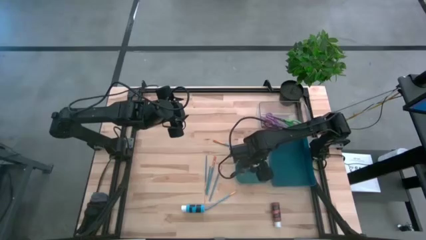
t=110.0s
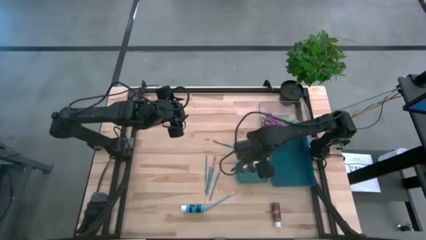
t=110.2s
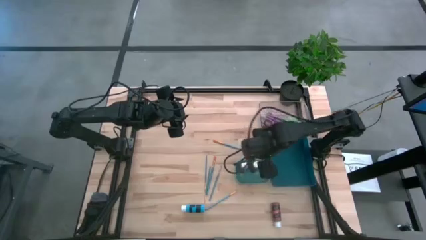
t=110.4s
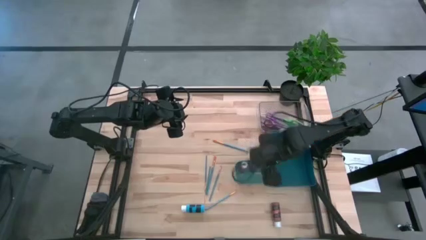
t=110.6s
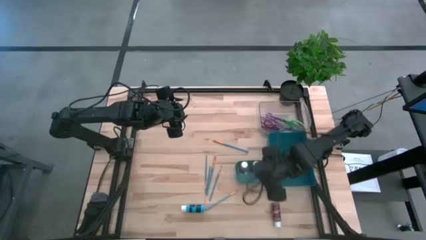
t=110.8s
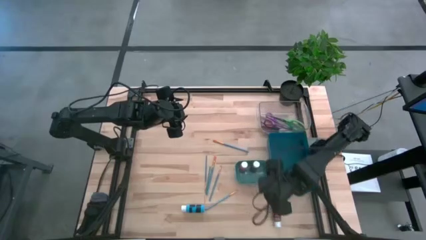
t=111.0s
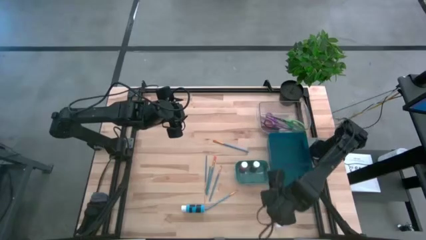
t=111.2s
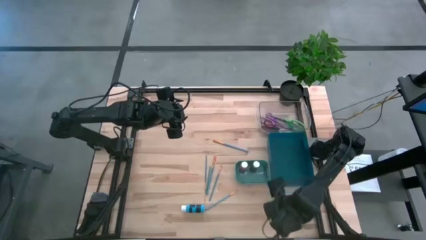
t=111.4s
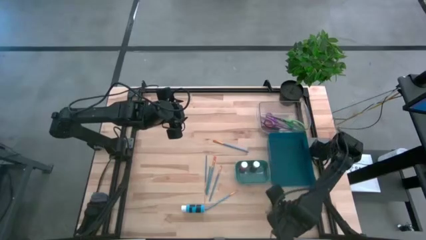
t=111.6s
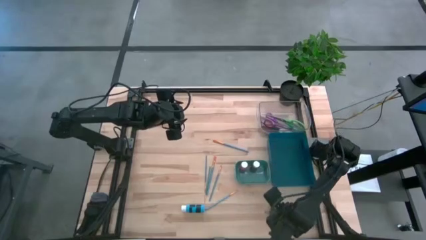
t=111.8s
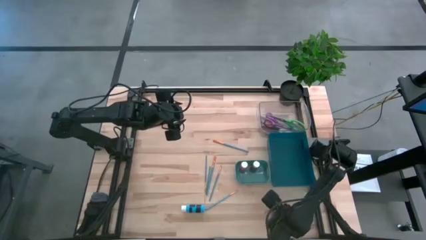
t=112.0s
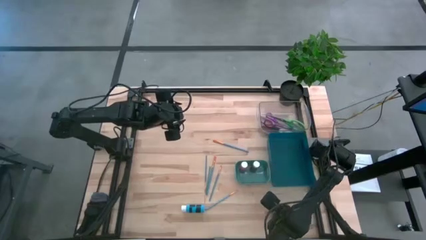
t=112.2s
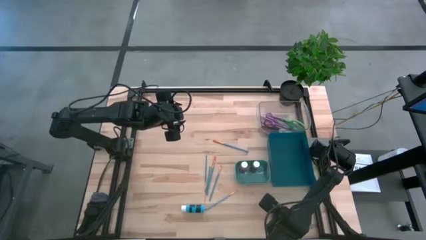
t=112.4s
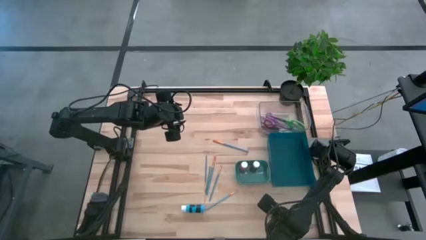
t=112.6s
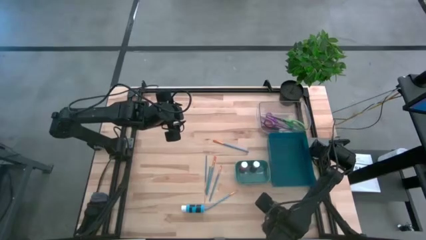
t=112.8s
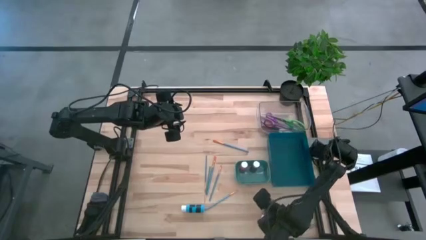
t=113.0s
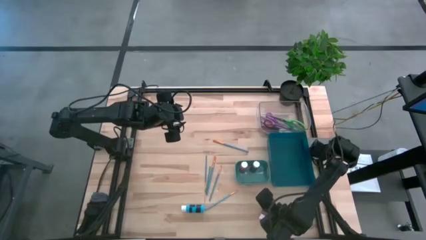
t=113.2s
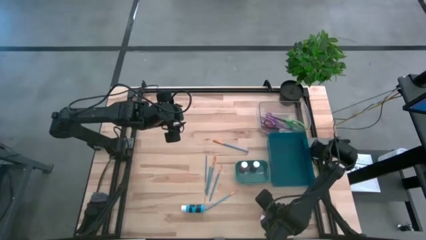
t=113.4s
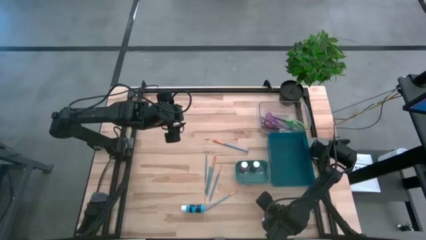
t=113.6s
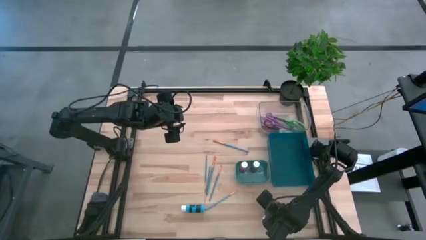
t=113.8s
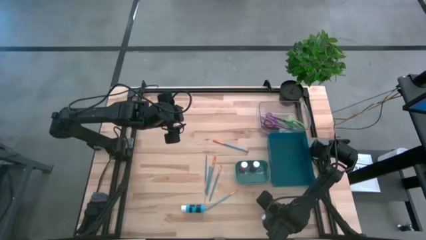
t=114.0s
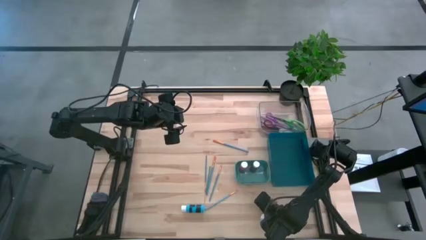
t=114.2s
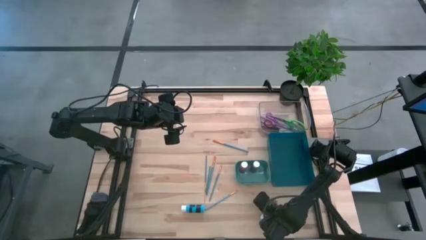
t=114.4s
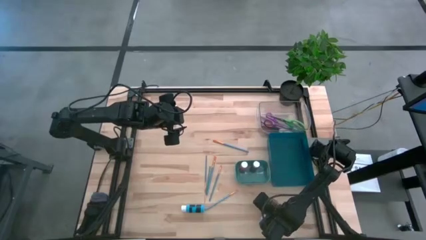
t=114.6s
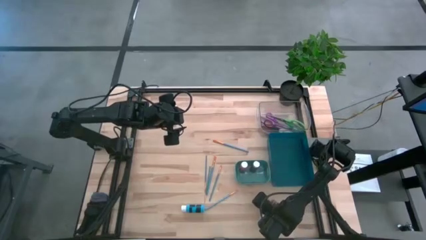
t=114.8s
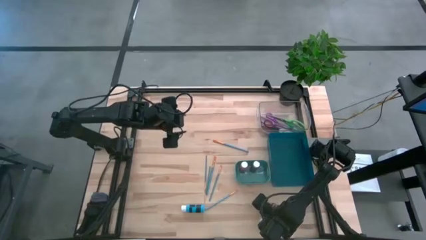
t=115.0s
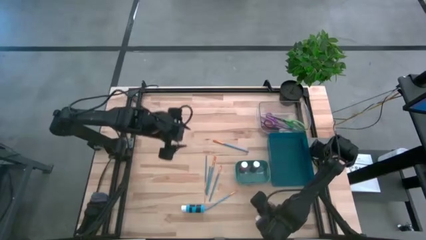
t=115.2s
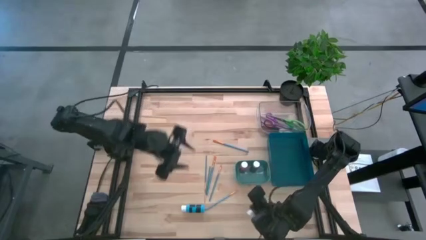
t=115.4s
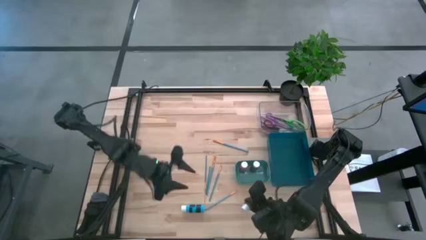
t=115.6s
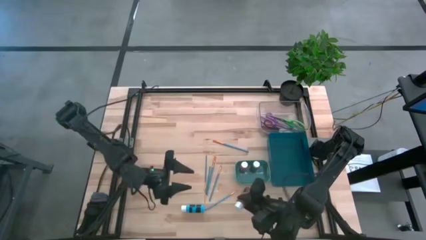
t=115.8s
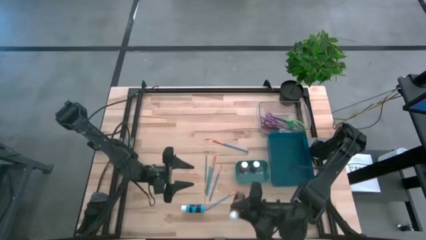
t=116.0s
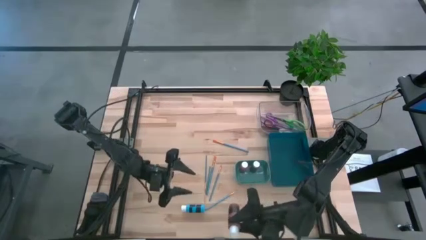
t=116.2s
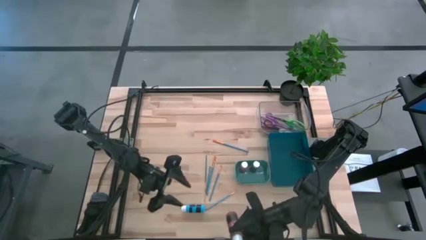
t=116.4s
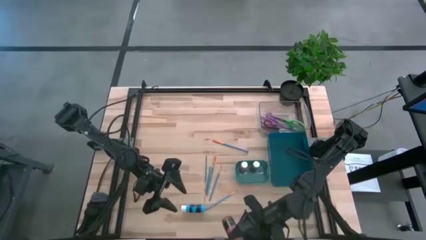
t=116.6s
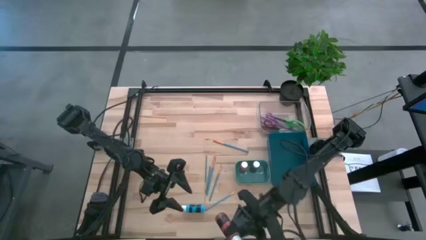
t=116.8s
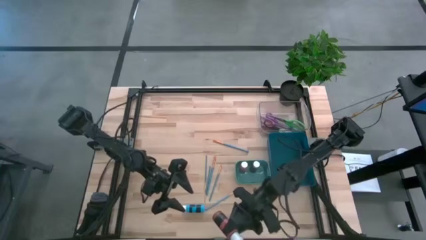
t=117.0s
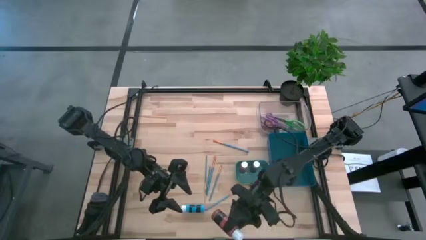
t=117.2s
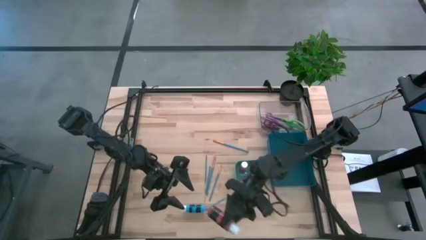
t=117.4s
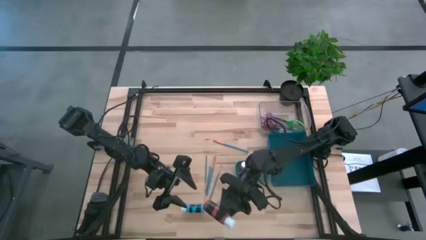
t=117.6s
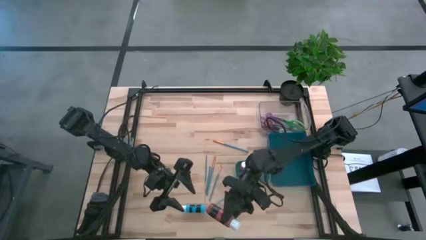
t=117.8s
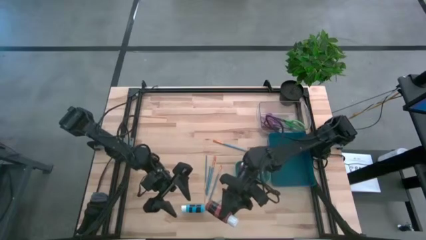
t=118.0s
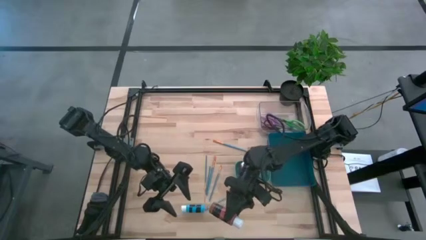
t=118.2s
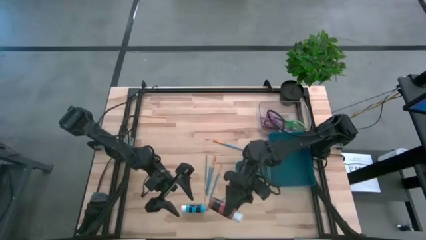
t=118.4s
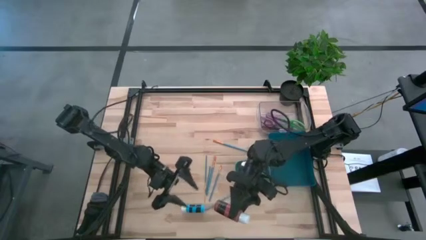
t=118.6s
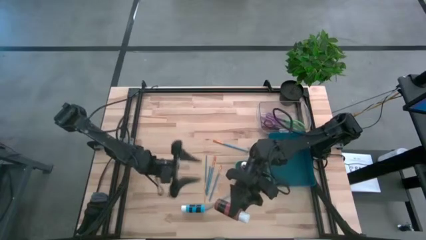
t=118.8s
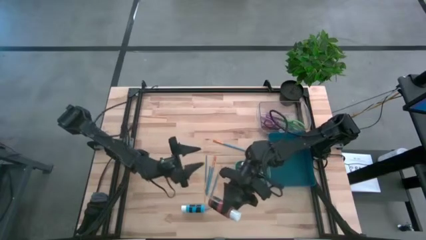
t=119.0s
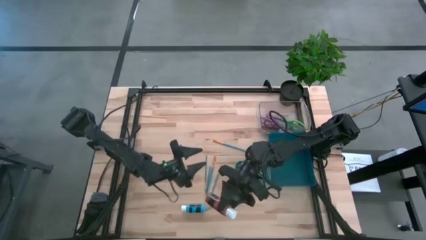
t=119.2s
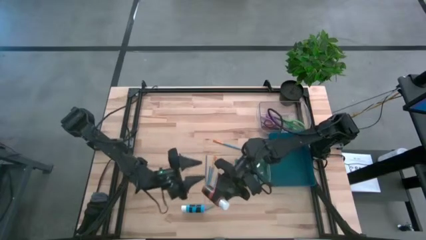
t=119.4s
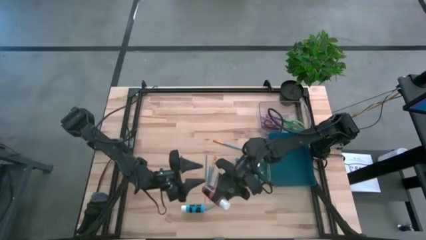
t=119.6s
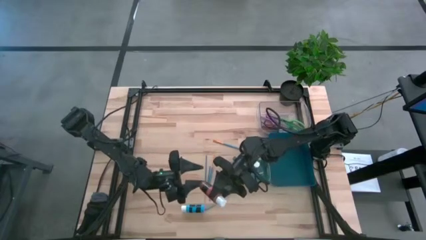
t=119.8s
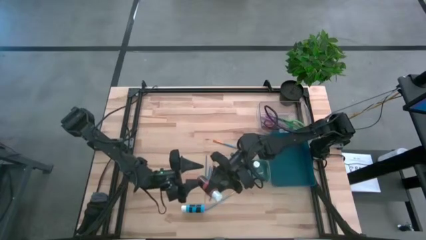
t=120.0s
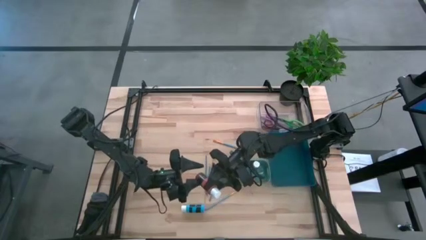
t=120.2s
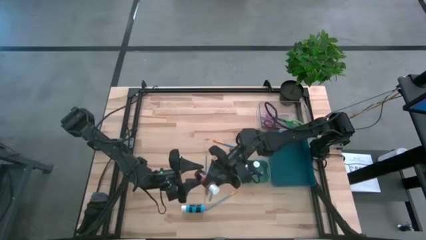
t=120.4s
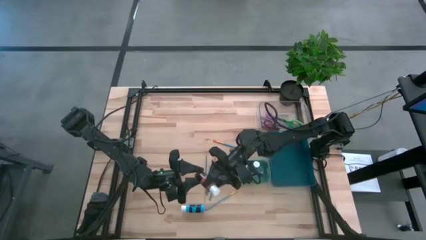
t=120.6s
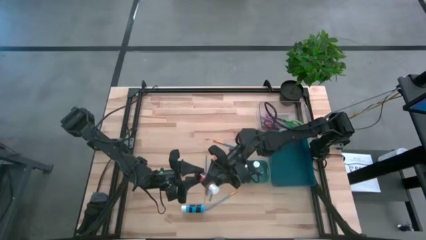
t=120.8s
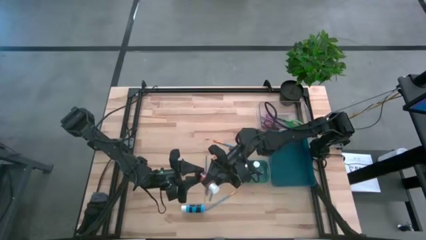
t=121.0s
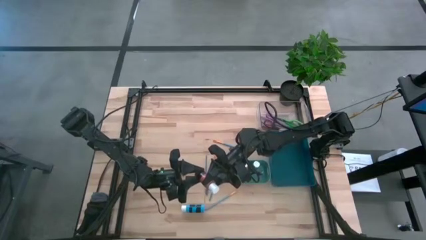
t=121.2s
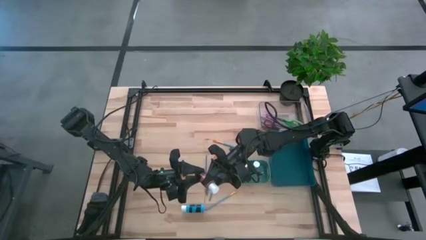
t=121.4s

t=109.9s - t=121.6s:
Task: Pick & Place Paint Supplies
Put the brown paint bottle into the green bin

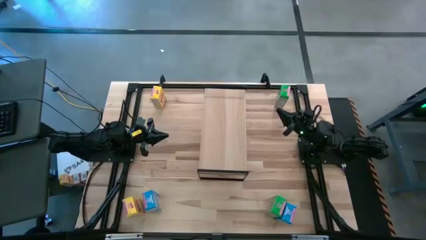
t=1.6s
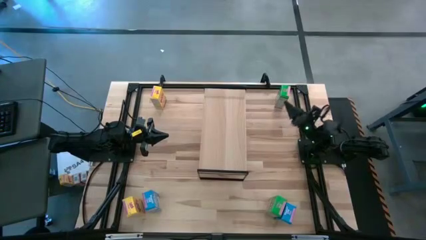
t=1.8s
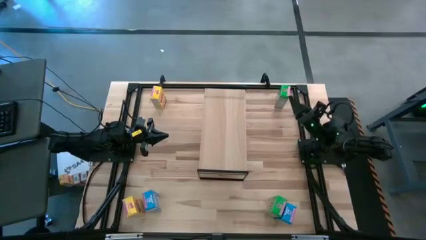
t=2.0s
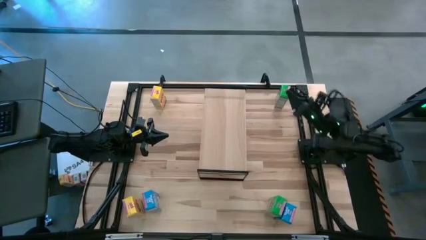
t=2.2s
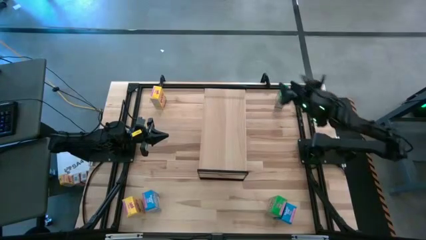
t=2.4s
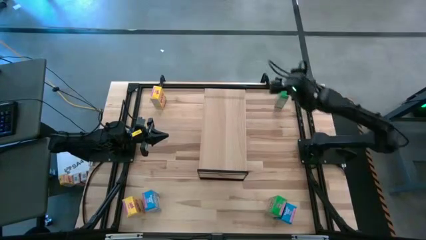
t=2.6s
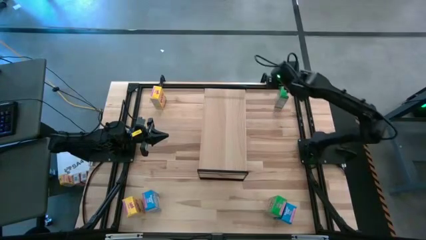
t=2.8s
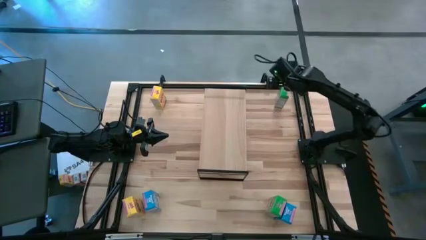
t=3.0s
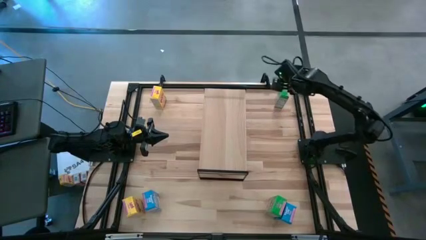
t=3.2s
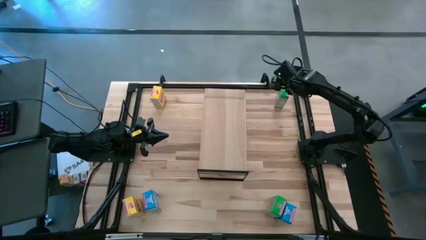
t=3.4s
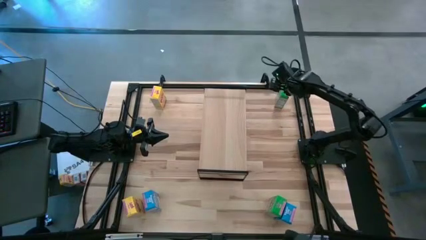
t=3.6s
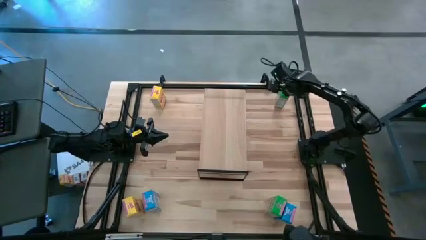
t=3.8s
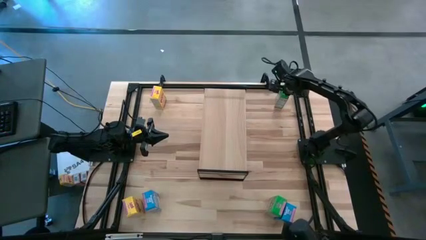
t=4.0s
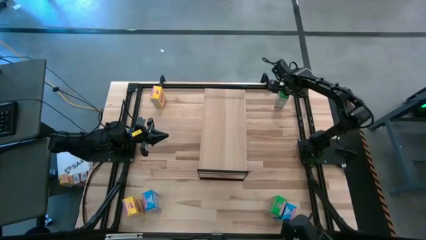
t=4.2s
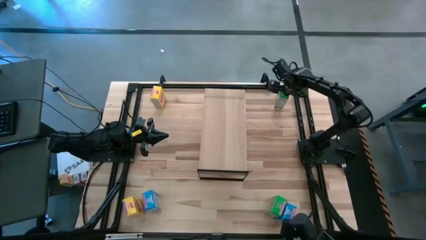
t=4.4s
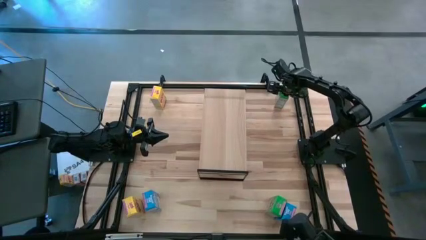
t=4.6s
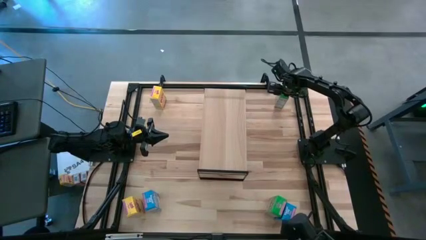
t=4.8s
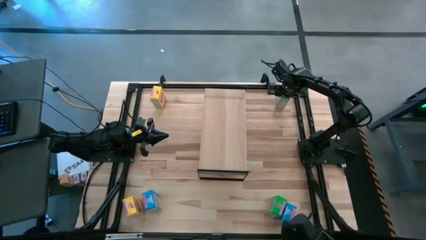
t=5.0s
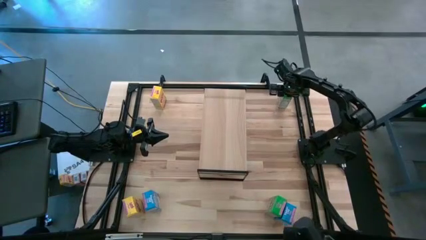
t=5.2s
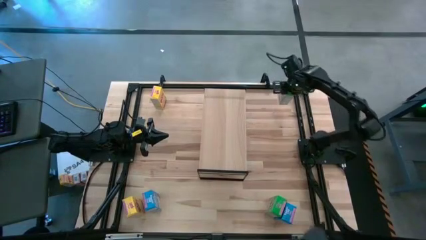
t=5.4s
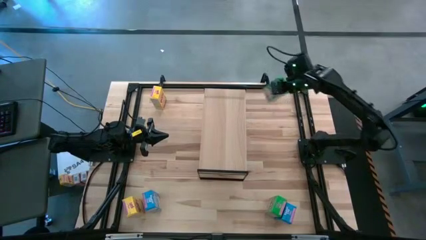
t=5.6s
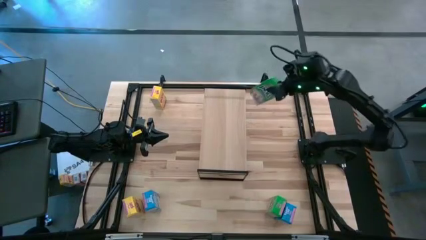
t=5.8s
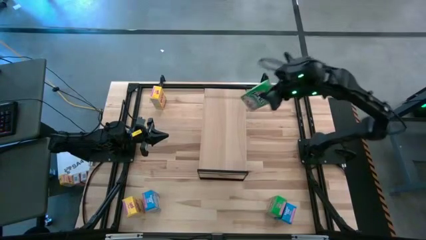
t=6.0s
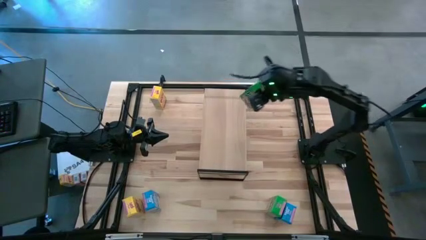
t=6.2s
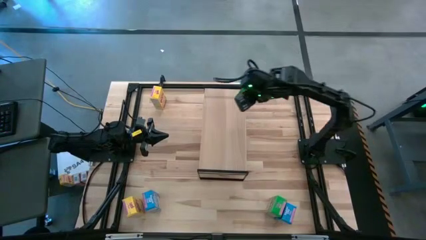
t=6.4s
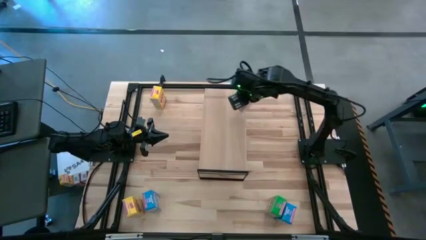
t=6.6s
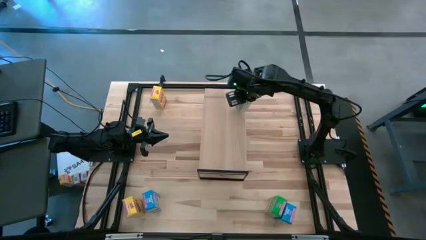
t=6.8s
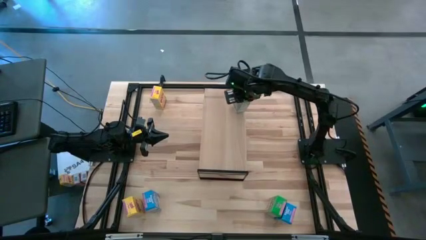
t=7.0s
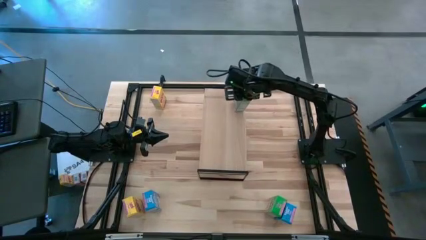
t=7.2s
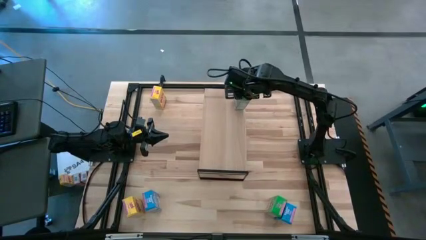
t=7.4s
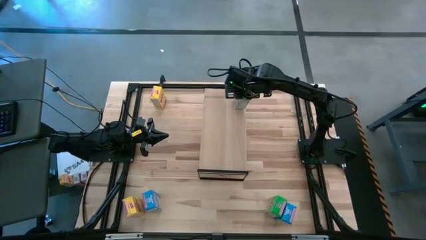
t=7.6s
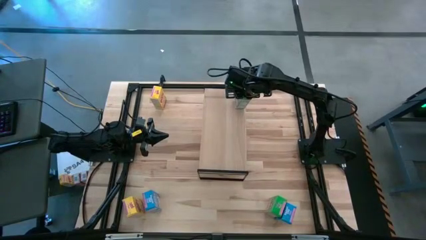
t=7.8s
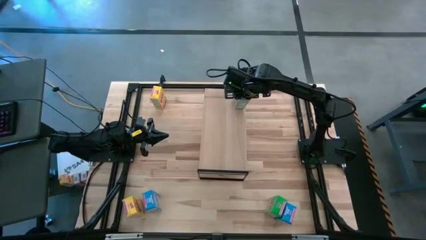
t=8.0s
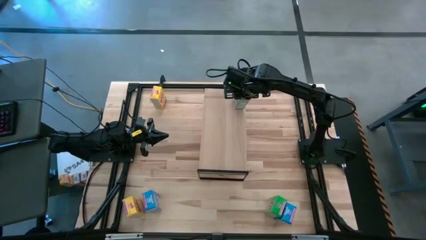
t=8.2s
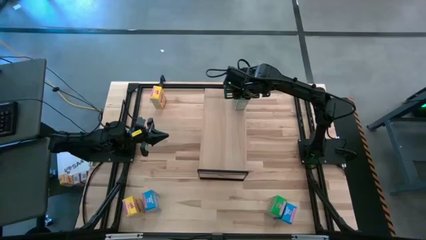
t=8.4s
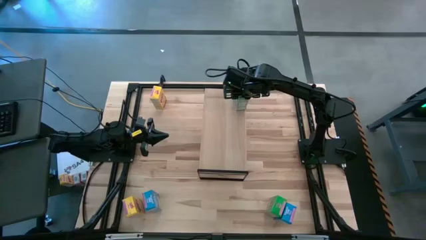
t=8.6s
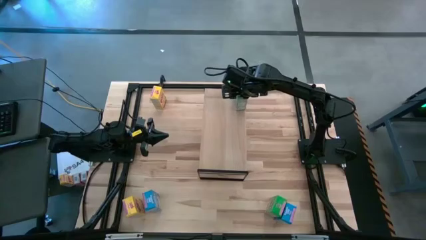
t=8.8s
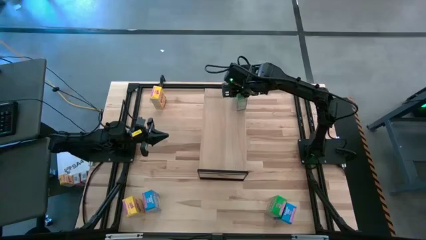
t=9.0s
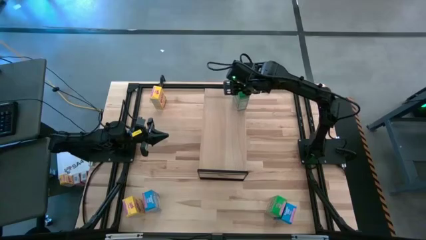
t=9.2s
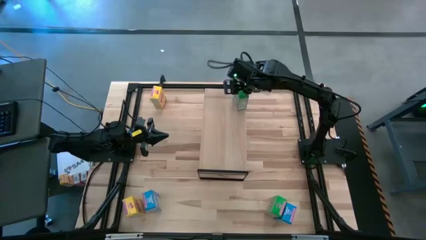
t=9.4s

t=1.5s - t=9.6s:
Task: Stack cereal on shelf
Put the top green cereal box on the shelf
